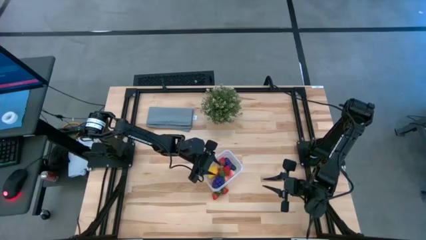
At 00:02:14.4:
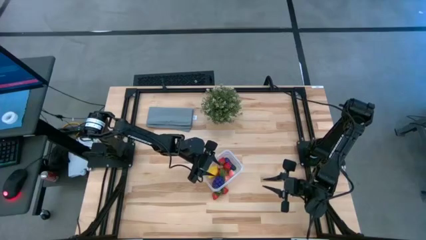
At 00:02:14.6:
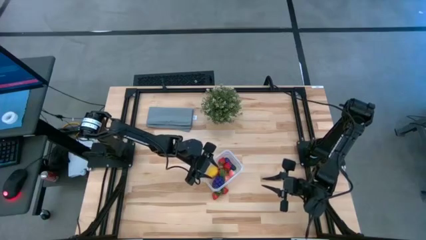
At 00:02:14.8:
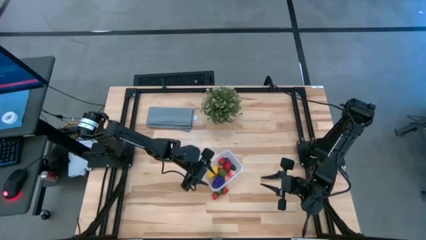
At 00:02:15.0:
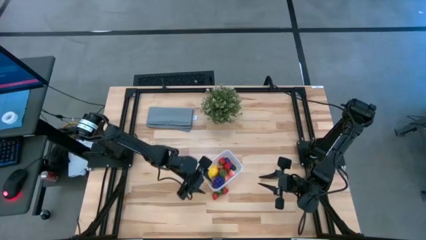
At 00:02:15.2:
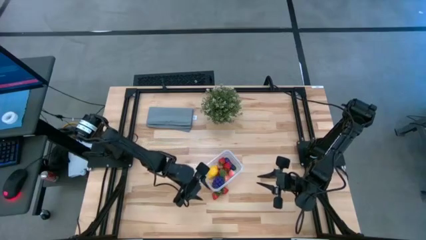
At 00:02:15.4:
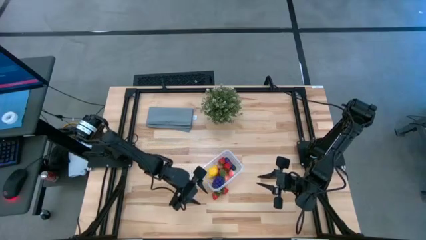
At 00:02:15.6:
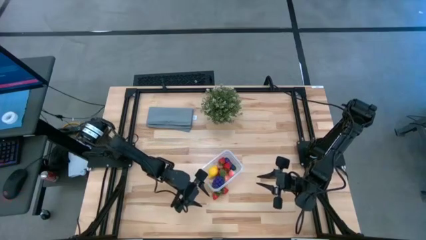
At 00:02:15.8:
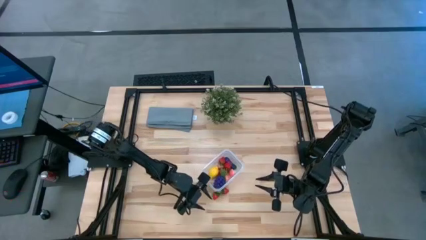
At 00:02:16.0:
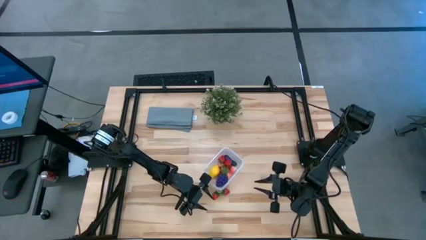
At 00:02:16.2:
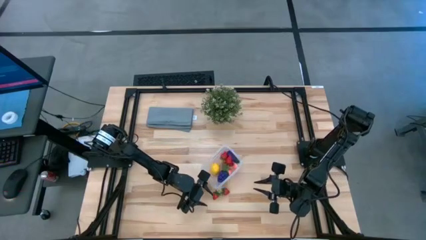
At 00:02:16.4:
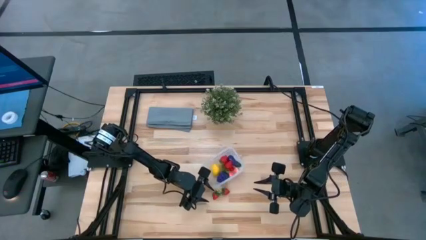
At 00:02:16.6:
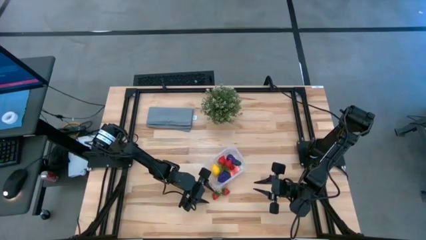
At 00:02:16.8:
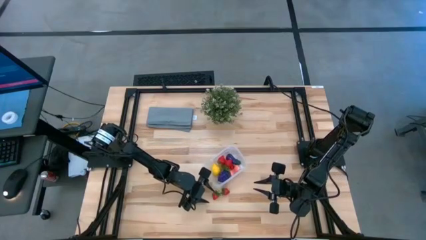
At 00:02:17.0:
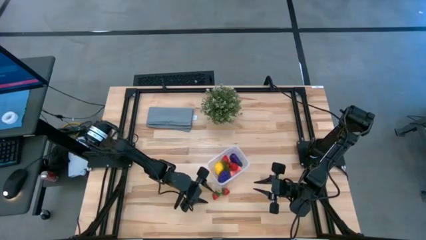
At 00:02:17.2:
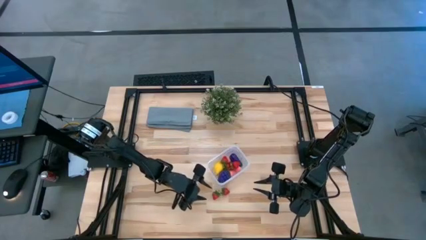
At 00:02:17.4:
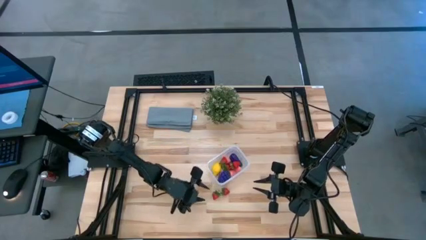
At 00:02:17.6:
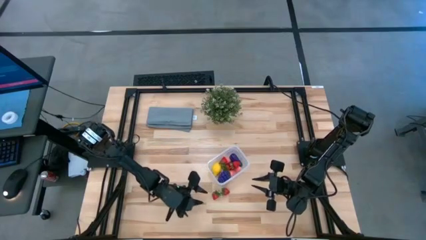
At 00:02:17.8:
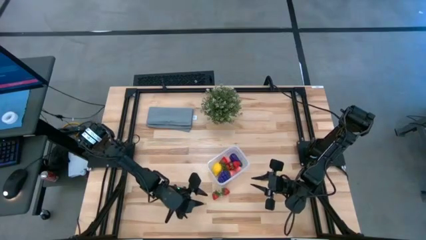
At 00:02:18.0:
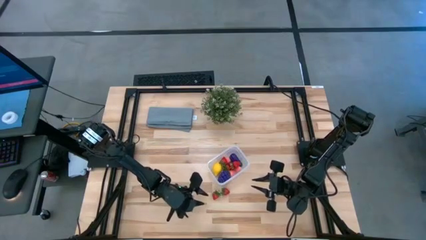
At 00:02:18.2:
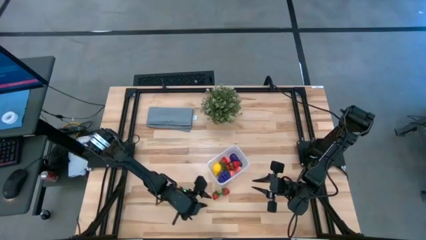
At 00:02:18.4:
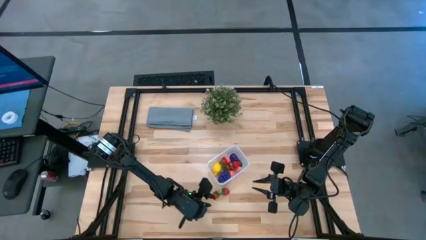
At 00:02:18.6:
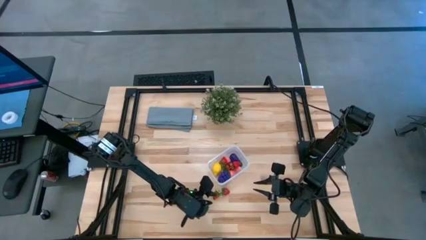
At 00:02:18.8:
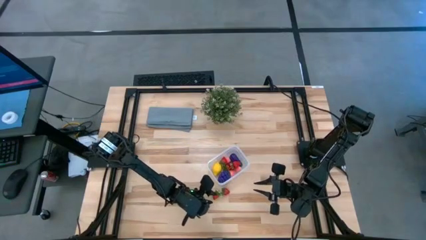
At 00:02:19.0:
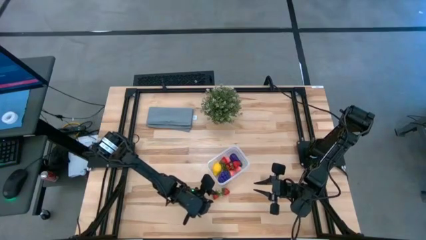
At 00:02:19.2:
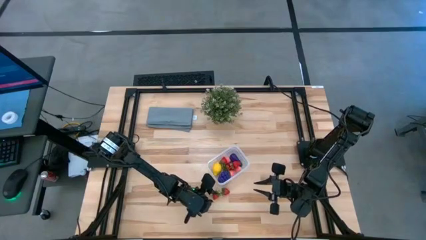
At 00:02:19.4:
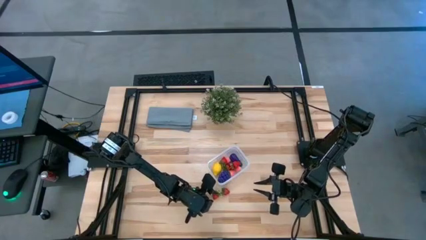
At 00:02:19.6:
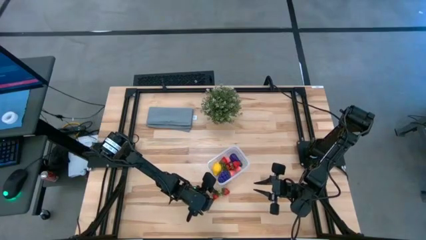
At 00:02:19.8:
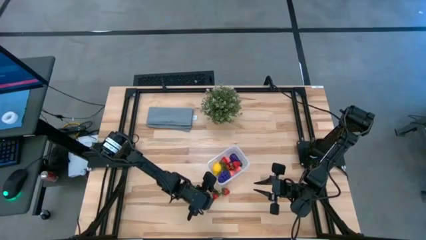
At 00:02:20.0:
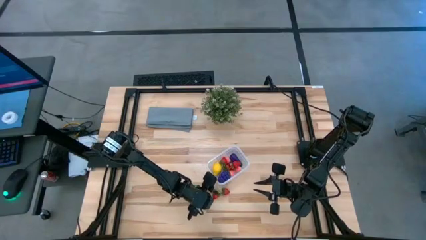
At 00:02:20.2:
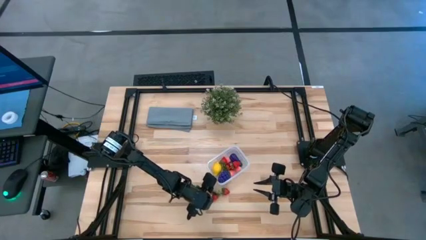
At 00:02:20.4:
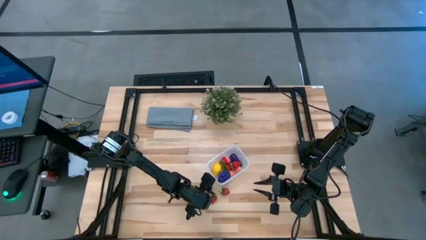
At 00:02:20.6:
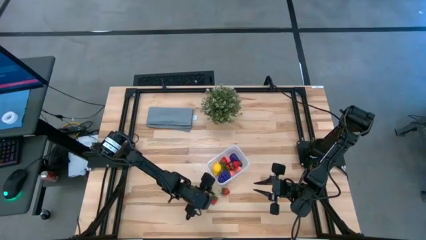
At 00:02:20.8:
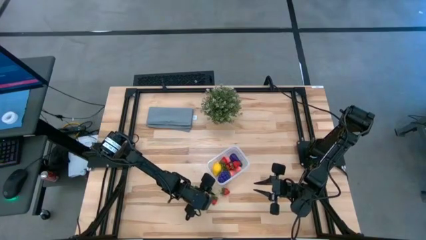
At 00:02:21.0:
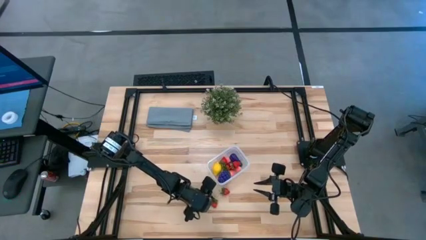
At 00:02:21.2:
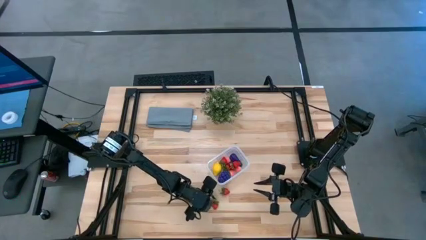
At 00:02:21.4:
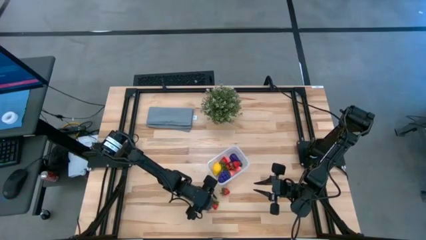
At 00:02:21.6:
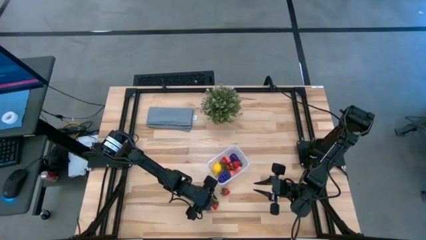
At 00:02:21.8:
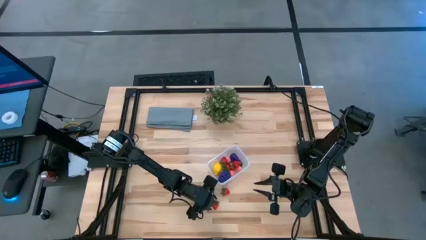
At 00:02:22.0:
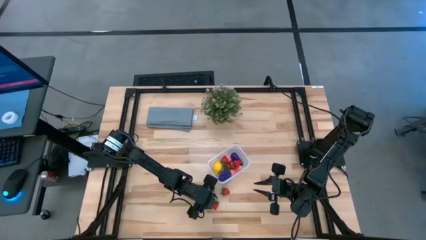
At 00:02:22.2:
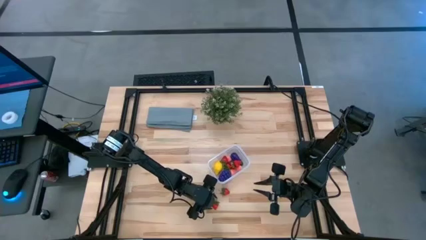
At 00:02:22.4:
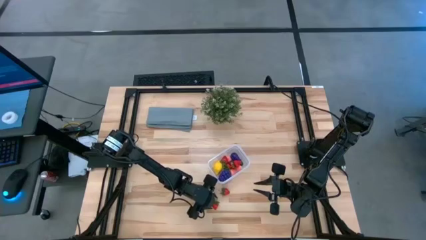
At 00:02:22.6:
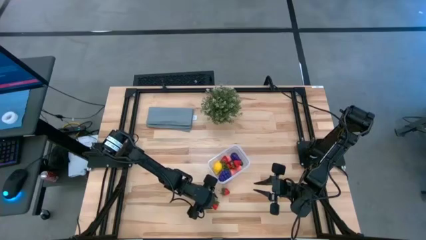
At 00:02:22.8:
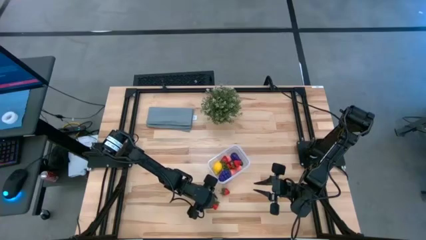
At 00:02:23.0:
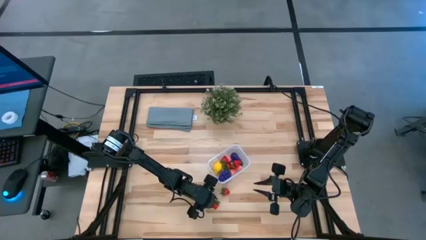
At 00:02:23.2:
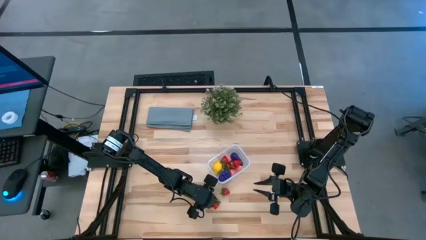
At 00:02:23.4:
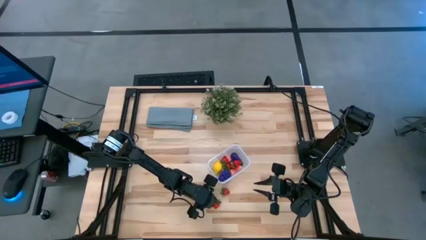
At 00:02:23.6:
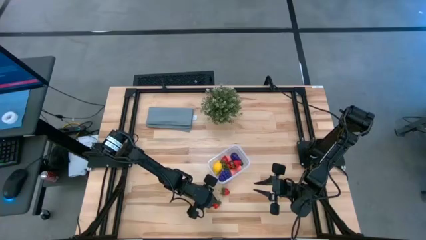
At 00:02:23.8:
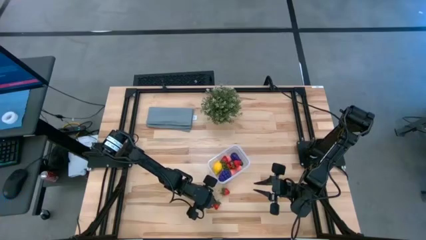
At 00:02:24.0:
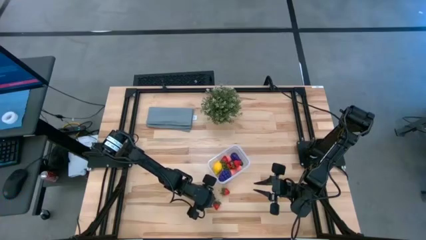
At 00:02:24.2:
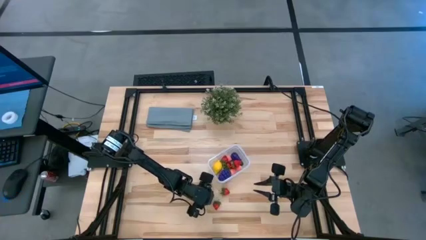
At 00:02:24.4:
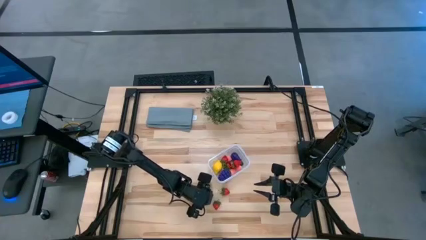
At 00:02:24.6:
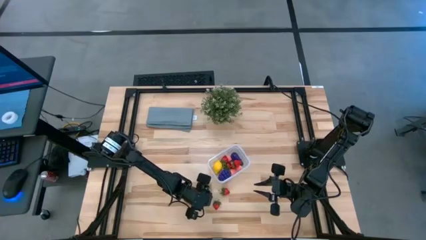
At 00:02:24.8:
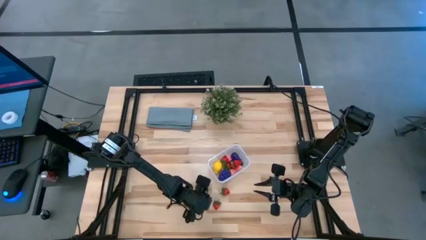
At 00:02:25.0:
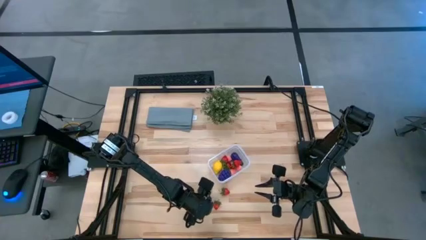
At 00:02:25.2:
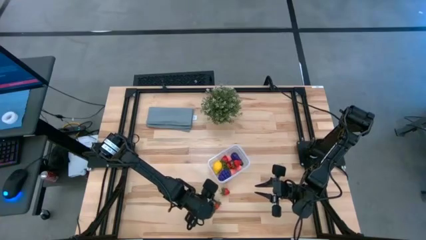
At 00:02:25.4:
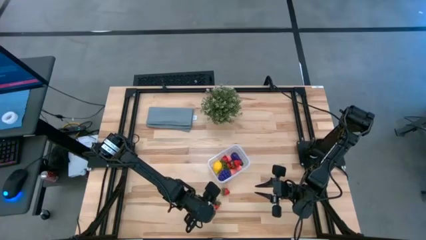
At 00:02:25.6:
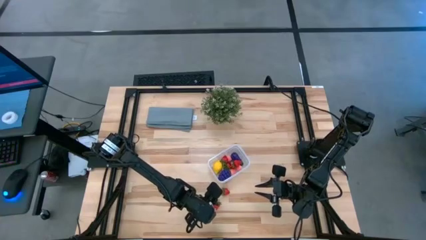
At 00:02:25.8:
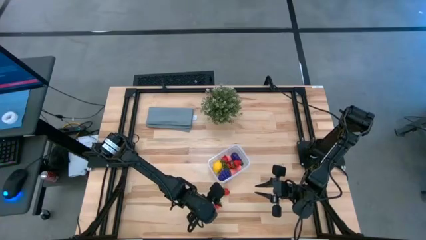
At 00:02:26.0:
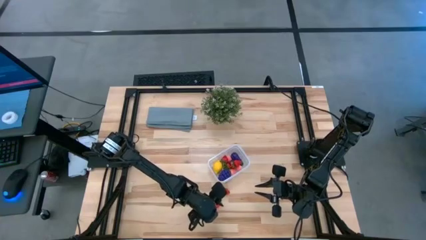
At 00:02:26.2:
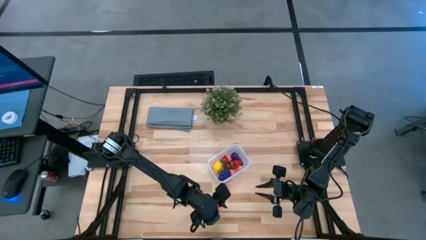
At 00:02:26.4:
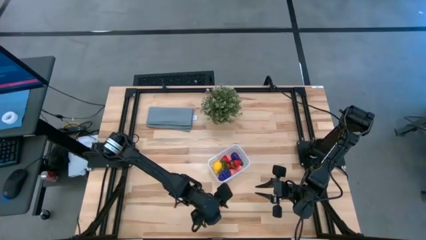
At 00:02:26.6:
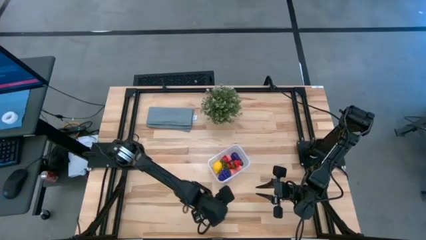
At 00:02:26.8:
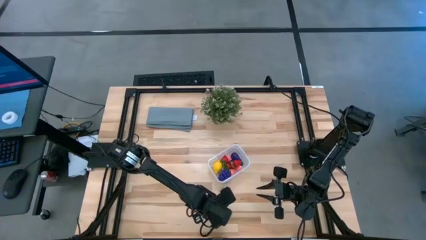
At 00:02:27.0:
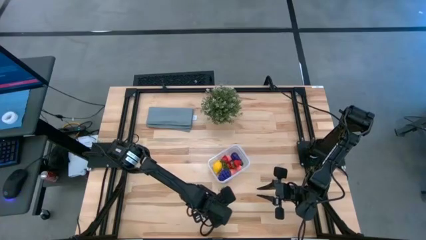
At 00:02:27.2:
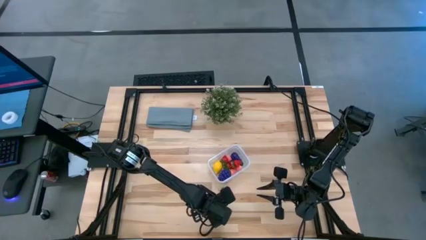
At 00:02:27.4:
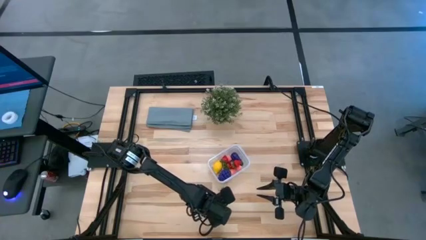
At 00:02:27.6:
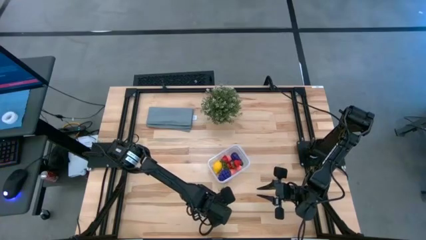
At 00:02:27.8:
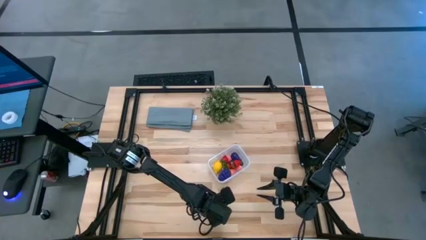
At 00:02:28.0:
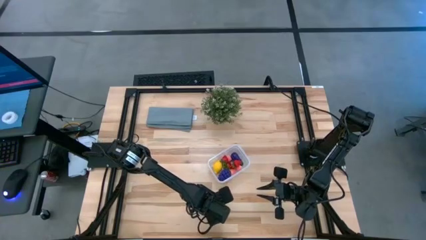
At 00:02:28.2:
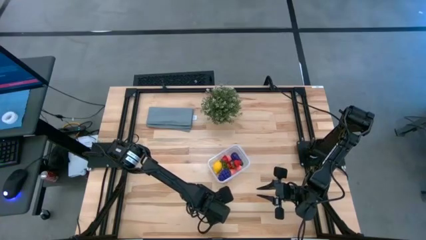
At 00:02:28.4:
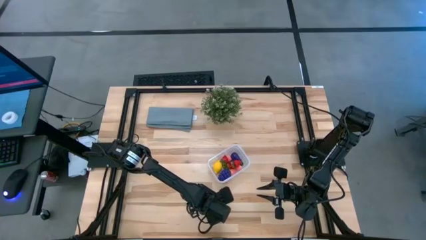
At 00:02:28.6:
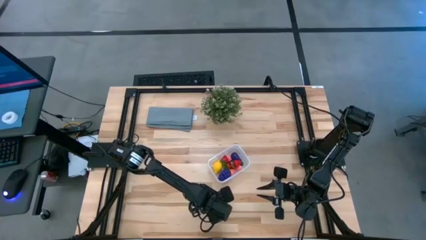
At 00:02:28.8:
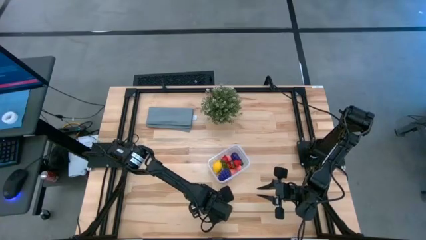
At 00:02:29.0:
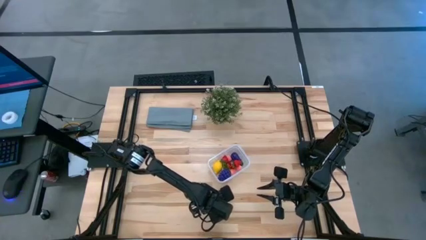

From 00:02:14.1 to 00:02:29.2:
Task: Pick and placing Produce into tupperware
Put the red strawberry into the transparent bin

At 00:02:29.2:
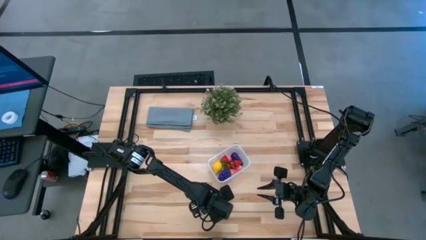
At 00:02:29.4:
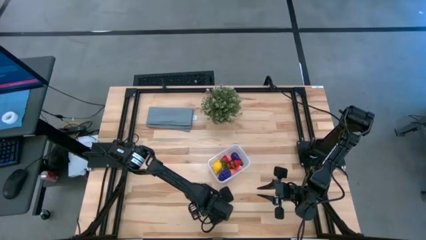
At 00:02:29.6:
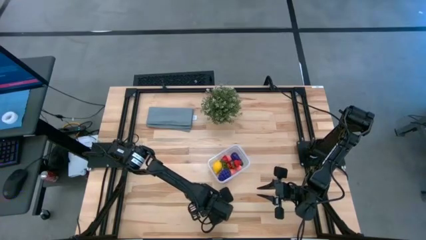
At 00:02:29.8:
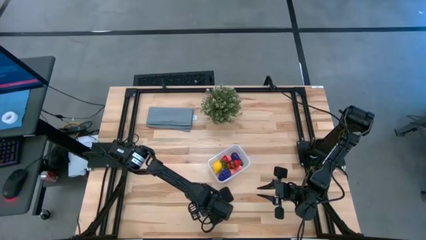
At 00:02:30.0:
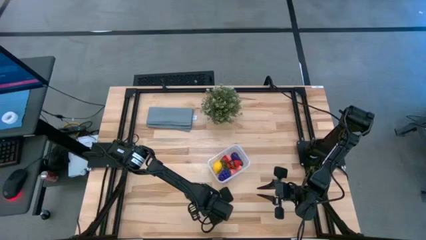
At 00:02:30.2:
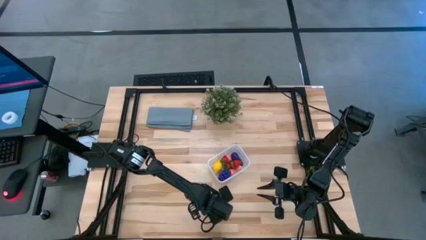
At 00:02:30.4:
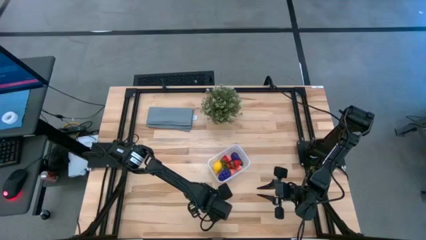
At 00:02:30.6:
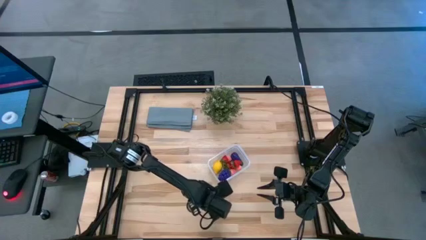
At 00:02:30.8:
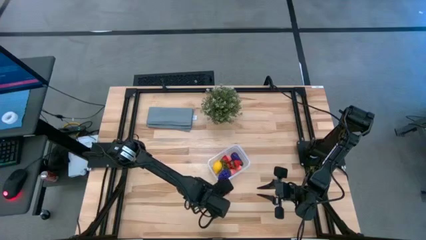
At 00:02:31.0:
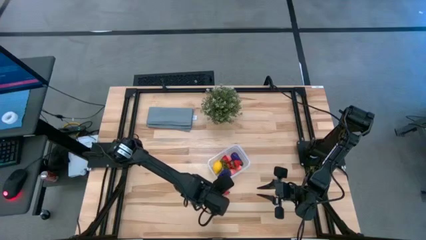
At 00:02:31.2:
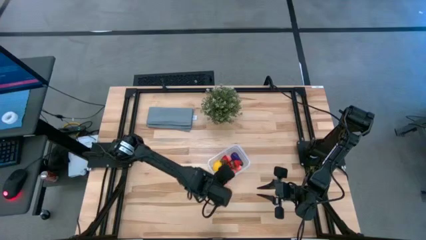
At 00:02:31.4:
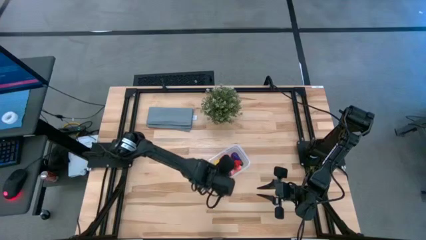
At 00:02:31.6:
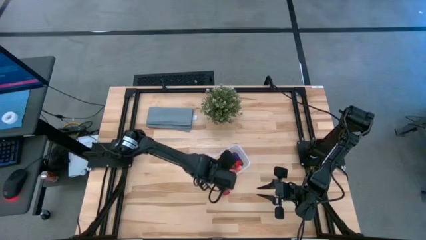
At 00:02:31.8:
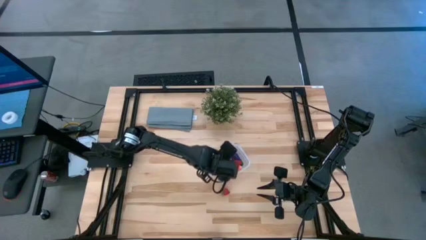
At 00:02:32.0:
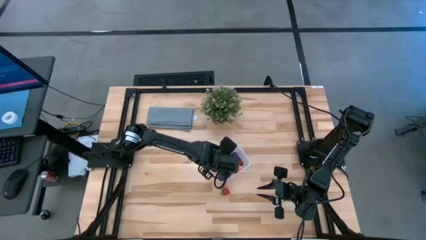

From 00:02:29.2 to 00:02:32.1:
Put the red strawberry into the transparent bin
